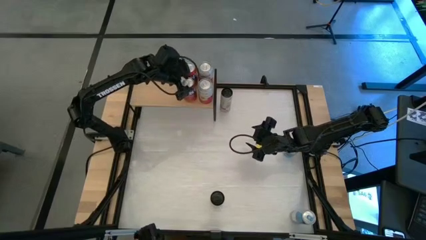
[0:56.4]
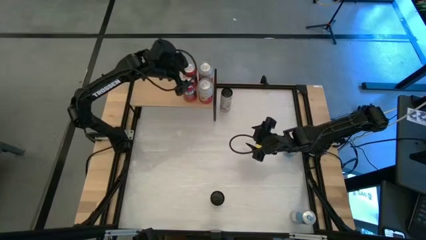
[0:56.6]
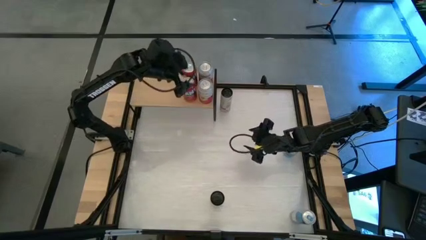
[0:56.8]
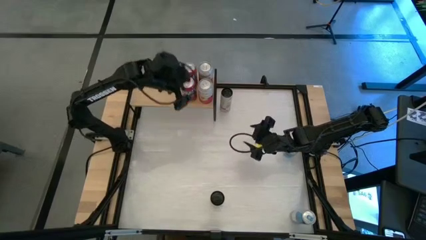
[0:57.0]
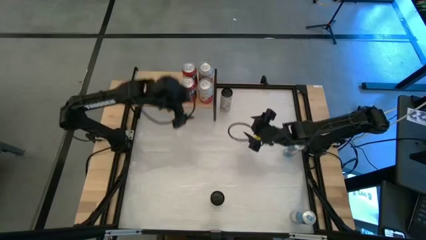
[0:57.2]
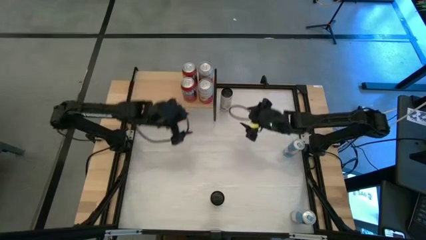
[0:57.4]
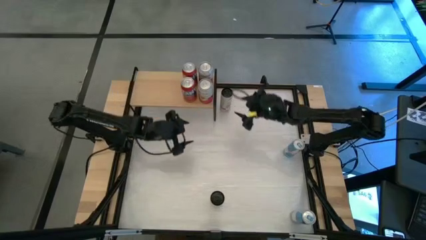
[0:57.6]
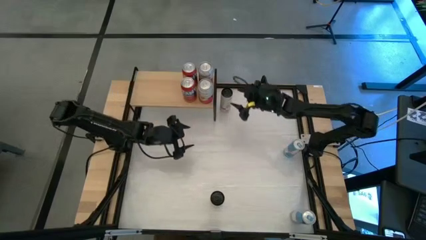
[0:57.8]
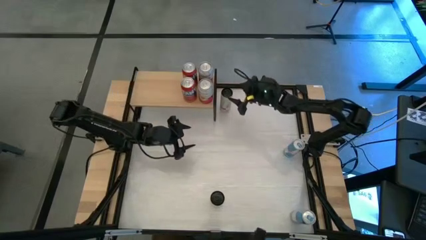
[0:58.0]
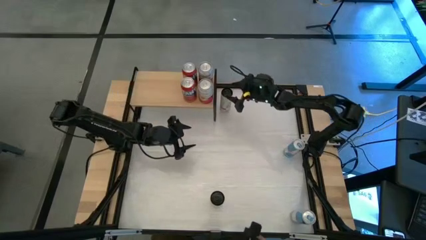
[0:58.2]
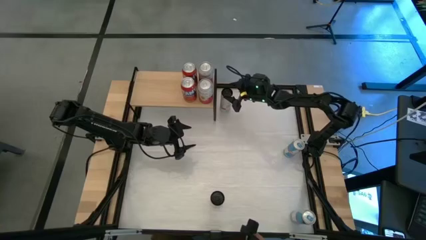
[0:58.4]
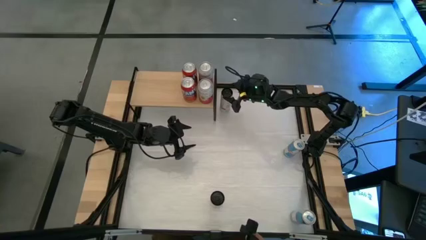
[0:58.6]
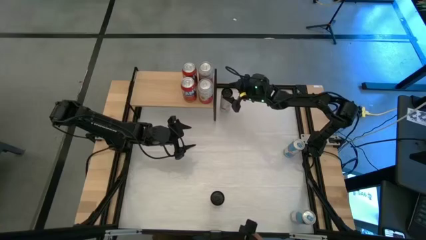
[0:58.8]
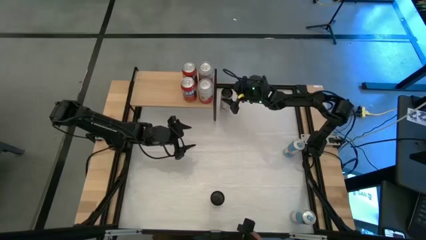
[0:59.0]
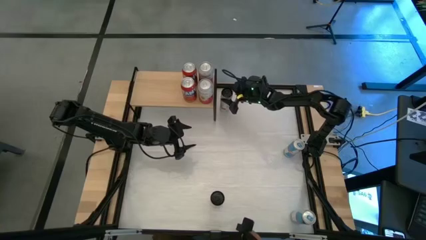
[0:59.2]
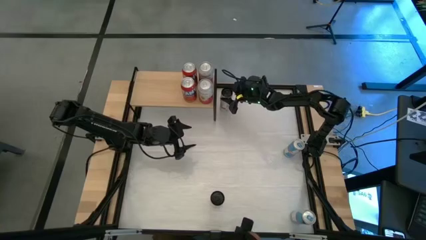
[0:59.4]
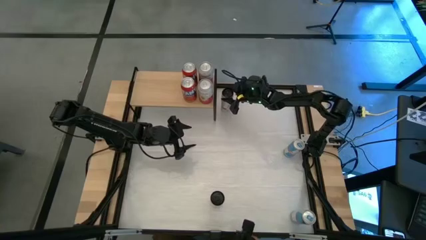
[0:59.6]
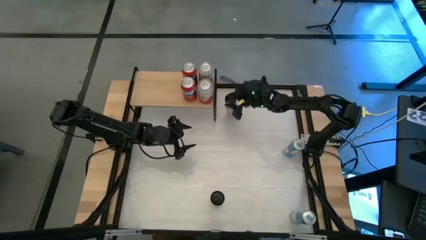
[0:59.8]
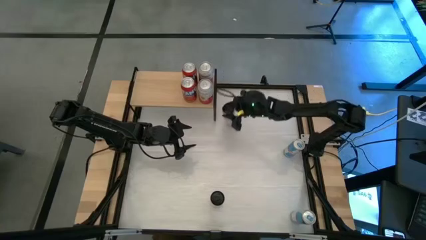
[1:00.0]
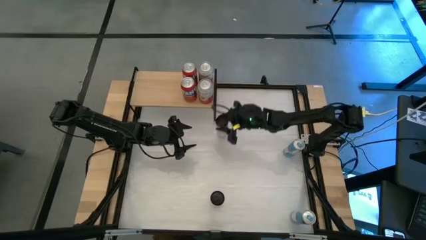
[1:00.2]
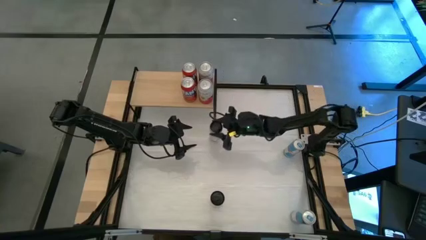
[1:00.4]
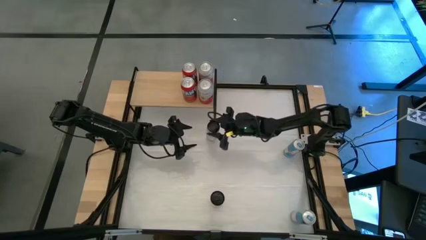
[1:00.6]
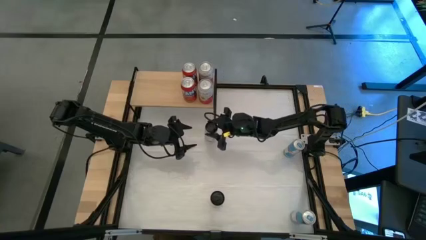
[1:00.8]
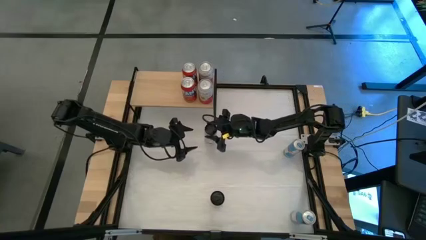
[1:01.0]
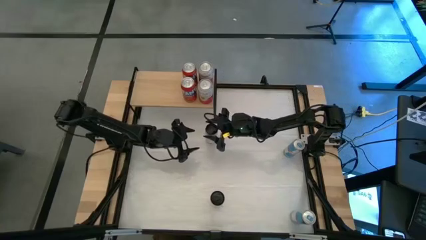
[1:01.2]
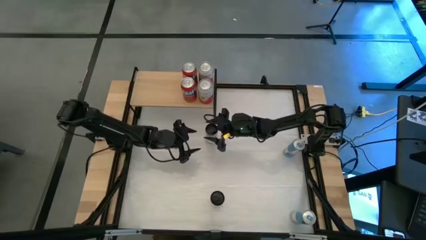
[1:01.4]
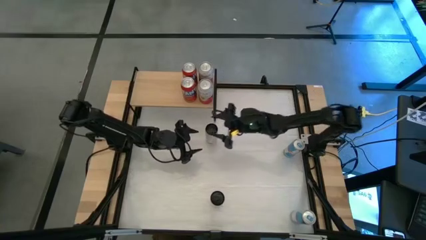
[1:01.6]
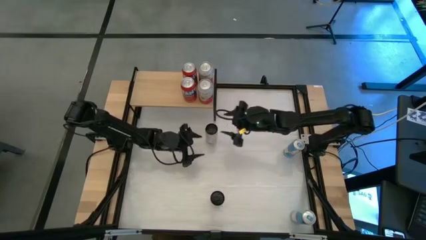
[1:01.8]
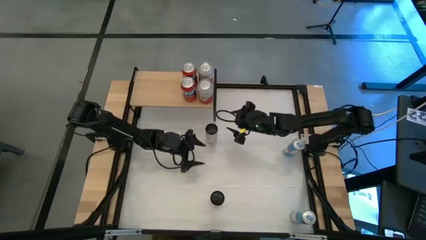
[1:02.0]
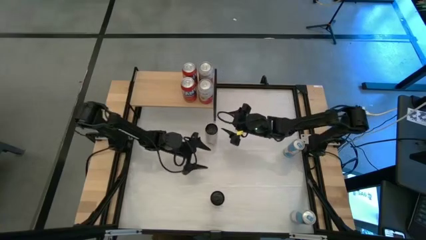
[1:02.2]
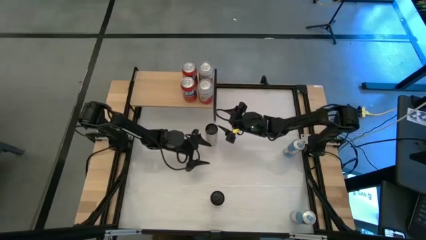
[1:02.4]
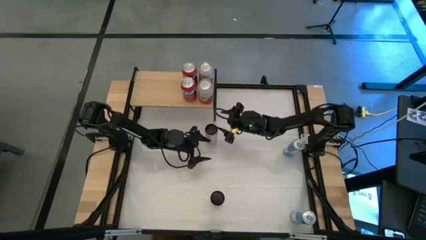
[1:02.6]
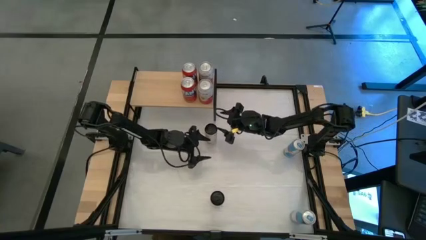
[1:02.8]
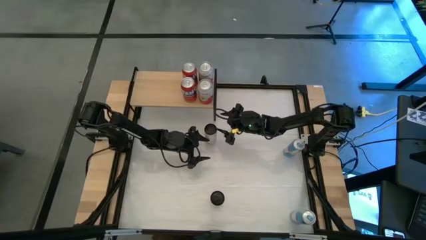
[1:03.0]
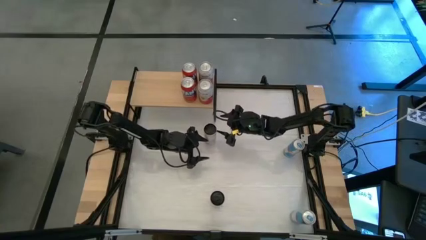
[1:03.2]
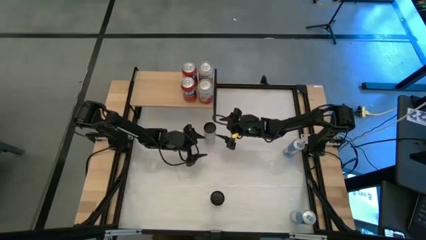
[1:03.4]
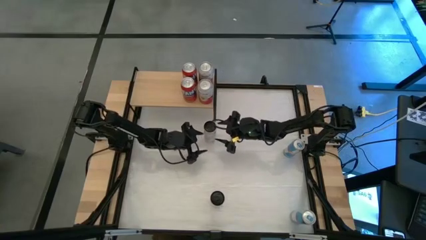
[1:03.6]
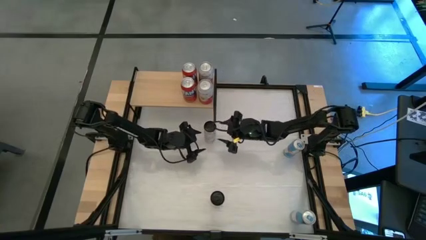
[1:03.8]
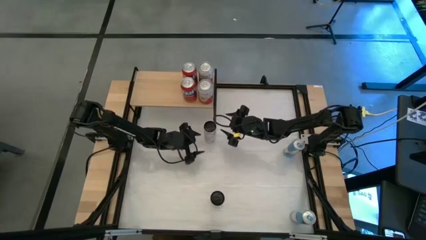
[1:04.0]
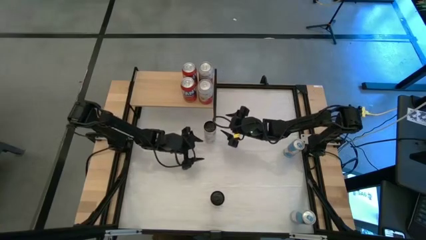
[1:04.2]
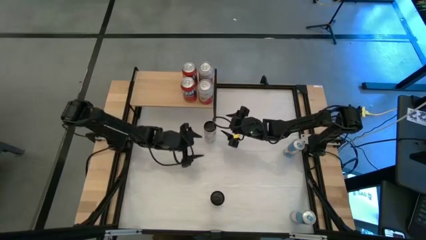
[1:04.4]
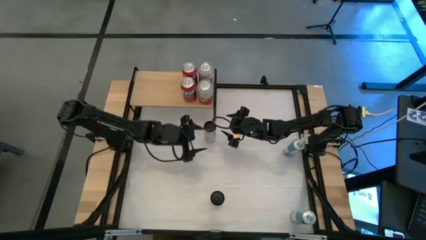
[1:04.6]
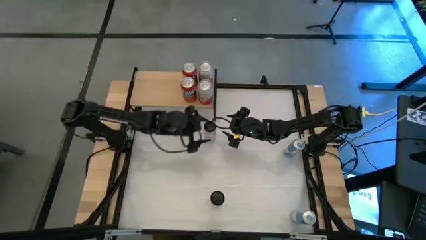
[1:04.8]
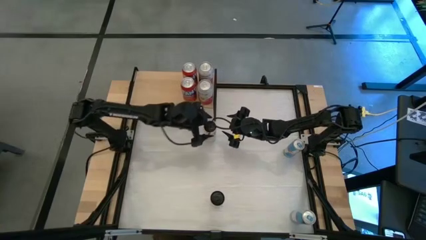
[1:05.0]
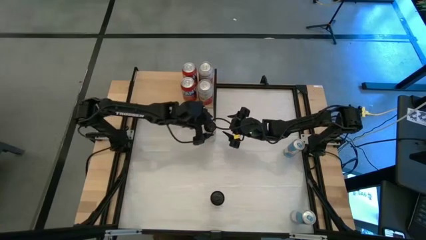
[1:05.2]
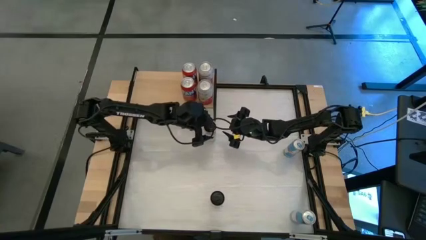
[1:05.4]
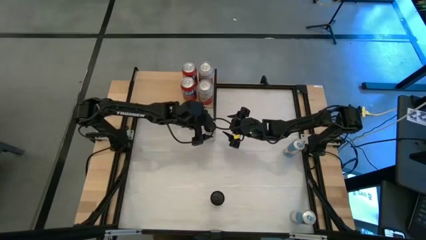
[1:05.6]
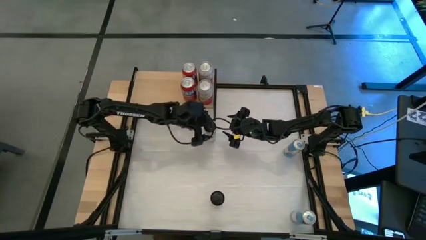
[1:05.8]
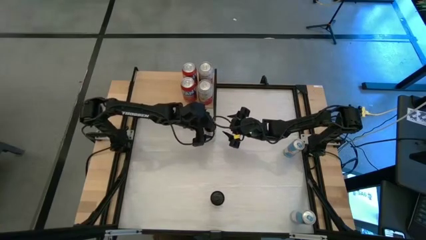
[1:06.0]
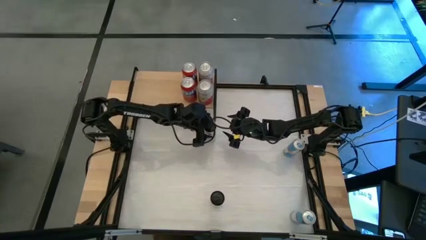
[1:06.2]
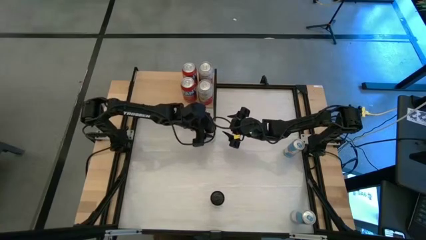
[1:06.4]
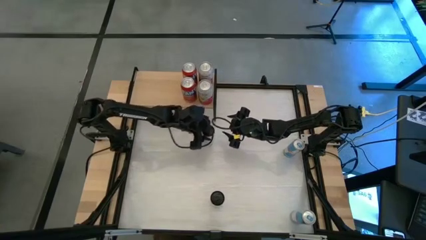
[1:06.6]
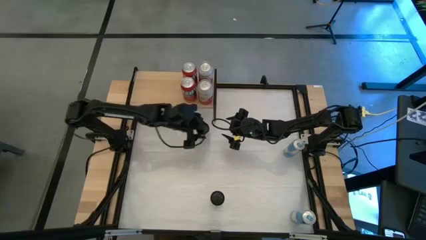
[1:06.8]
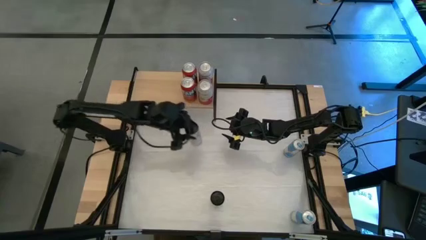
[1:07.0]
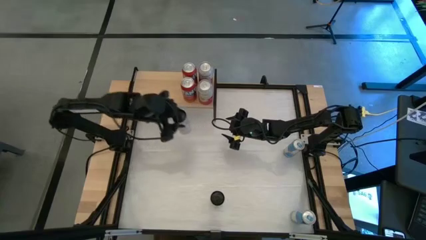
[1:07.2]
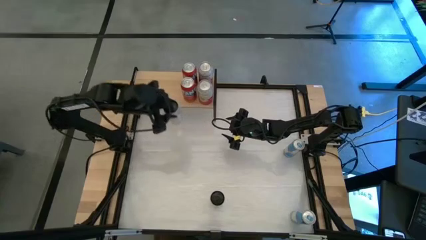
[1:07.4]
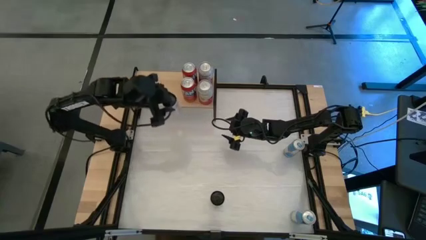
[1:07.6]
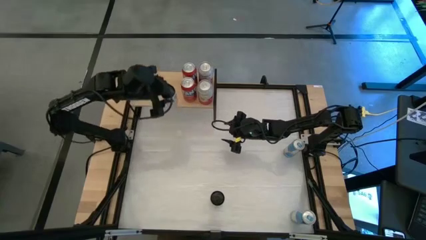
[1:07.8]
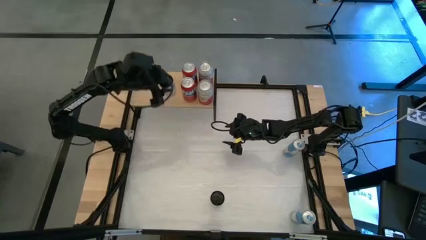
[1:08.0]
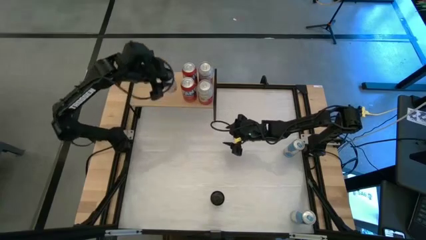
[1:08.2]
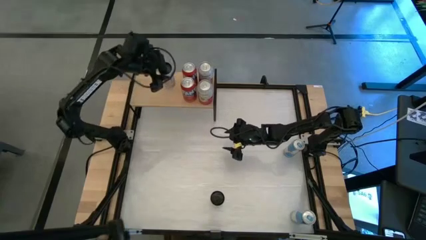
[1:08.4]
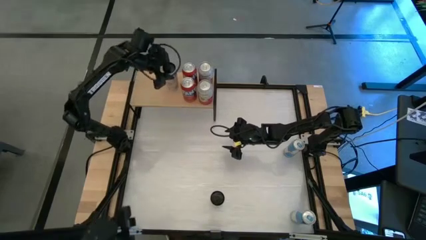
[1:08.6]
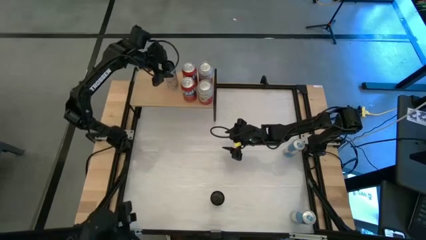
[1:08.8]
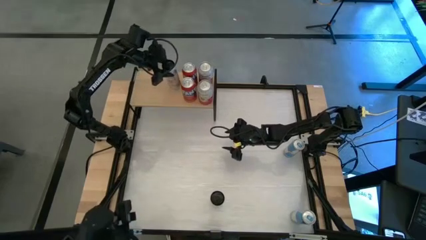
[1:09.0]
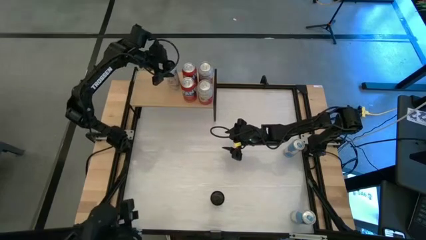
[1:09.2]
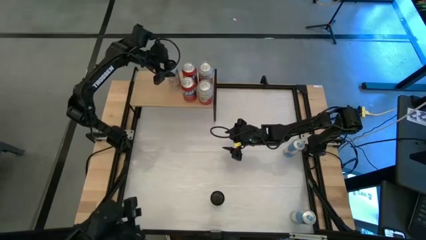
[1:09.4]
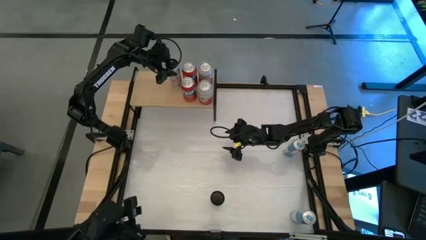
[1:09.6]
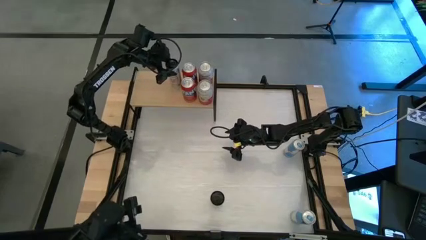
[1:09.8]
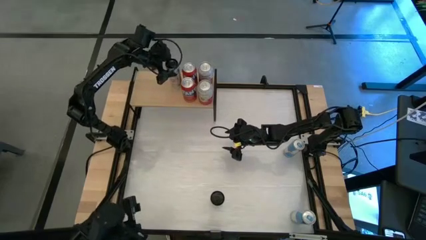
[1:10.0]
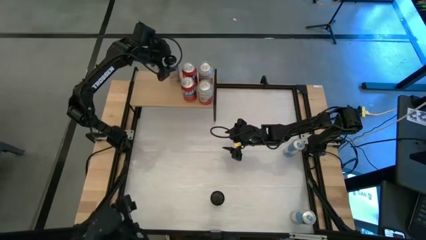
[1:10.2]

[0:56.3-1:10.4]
Task: Place canned beverage on shelf
Put the top white soda can on the shelf

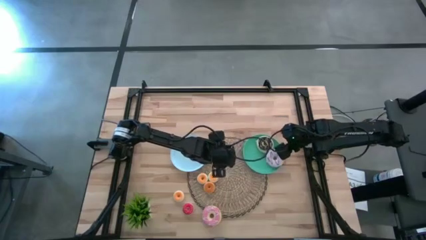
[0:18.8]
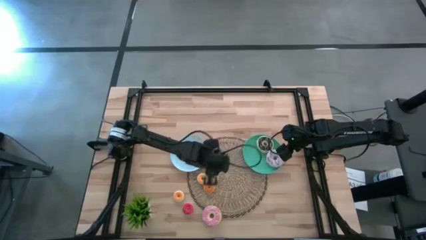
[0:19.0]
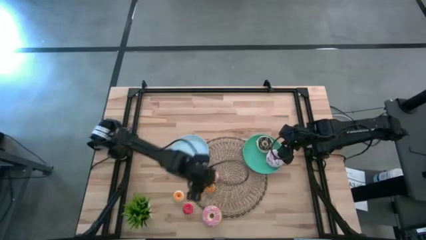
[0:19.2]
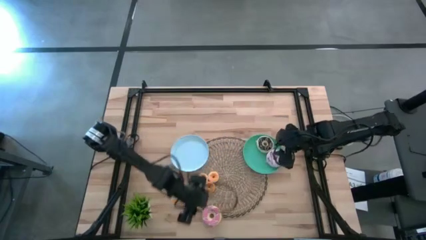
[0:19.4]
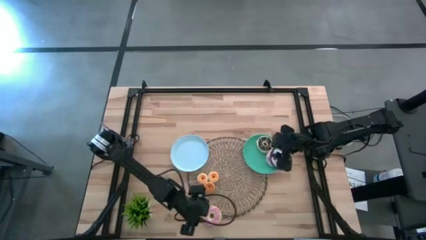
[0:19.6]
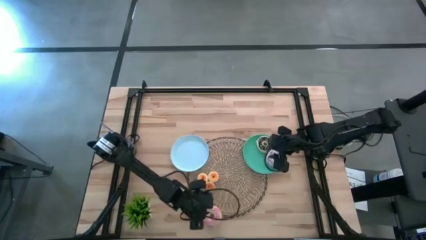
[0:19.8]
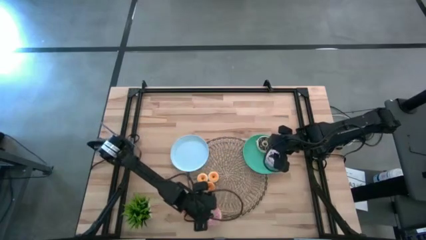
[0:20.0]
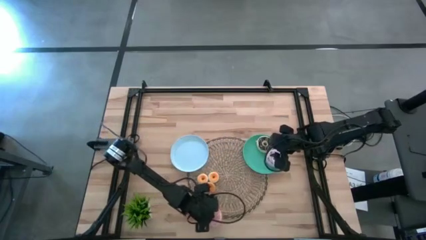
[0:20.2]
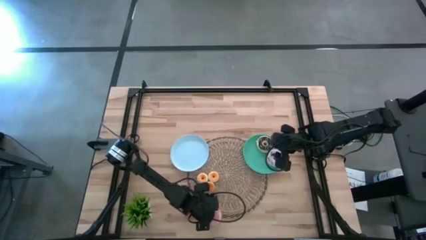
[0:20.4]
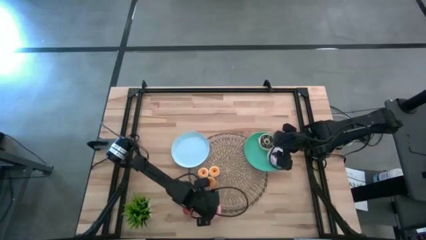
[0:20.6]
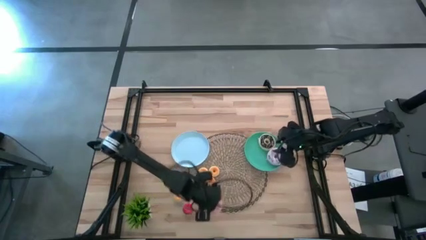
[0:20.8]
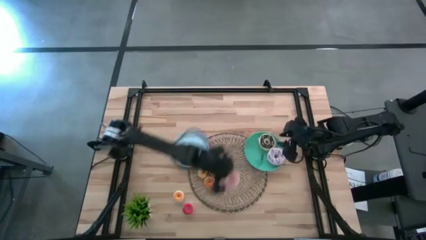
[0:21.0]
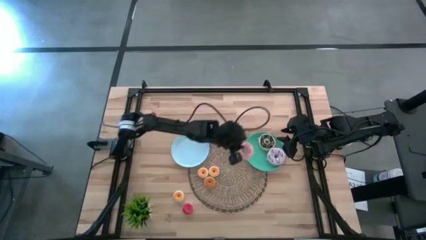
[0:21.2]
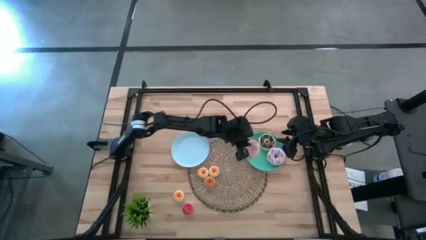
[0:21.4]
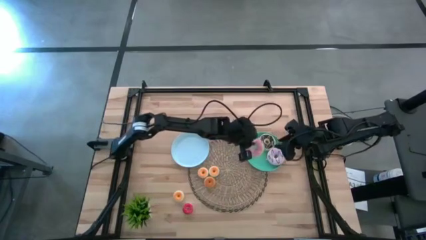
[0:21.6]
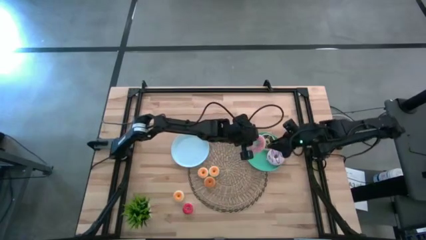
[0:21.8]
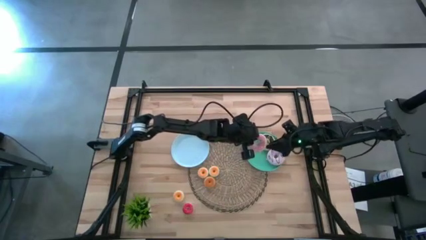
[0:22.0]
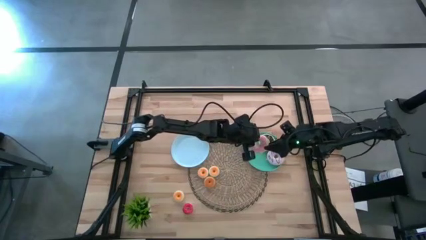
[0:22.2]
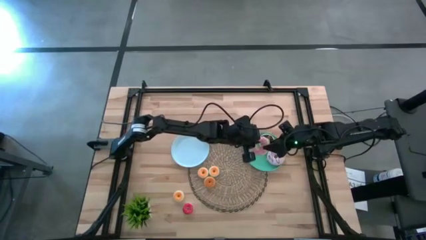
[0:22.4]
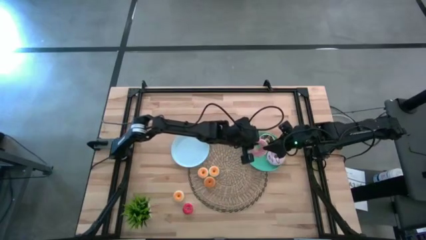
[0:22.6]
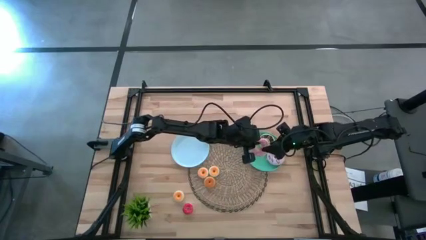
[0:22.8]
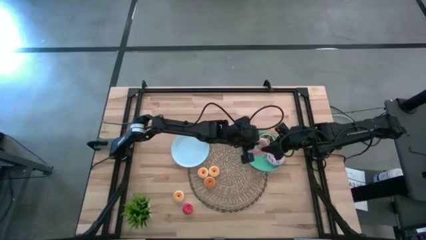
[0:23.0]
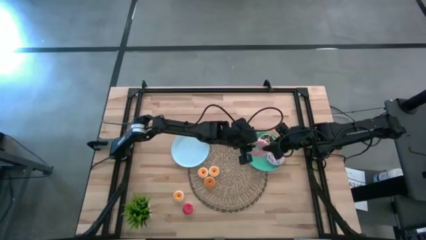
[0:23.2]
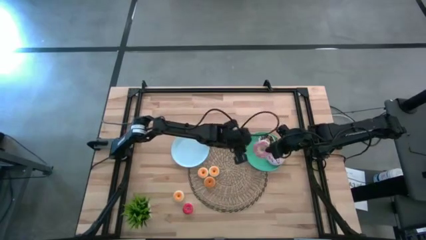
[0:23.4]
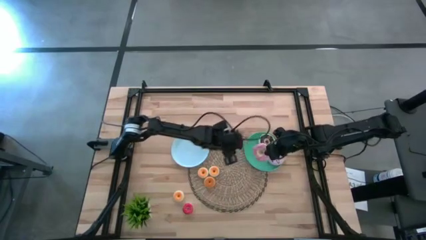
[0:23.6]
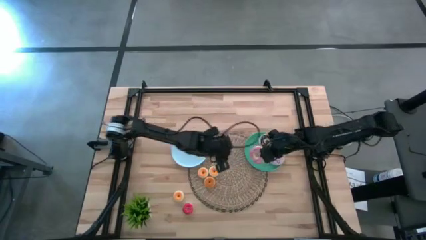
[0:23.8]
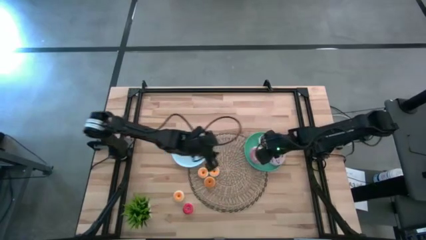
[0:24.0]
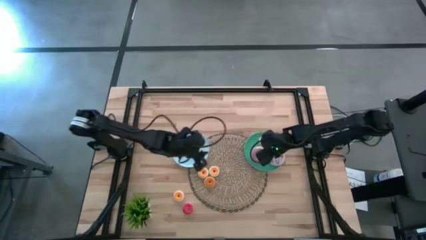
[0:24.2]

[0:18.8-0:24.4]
Task: Pick & Place donuts
Put the large pink donut on the green plate
